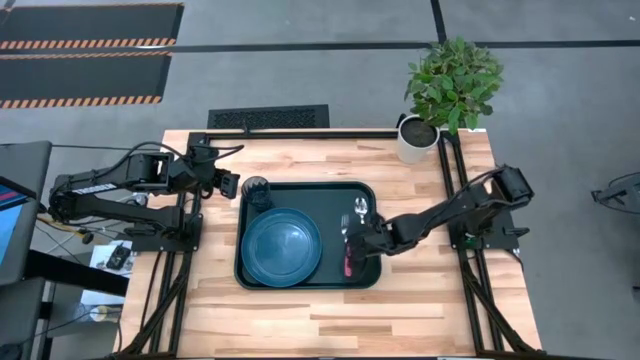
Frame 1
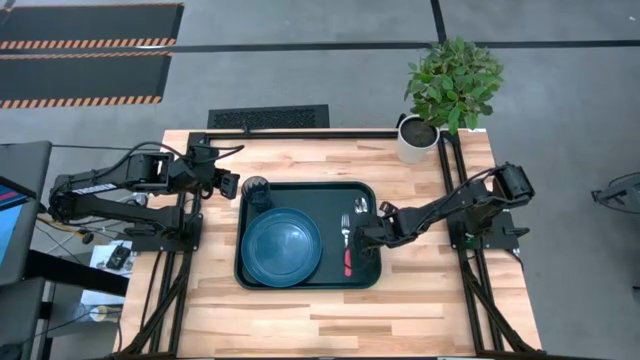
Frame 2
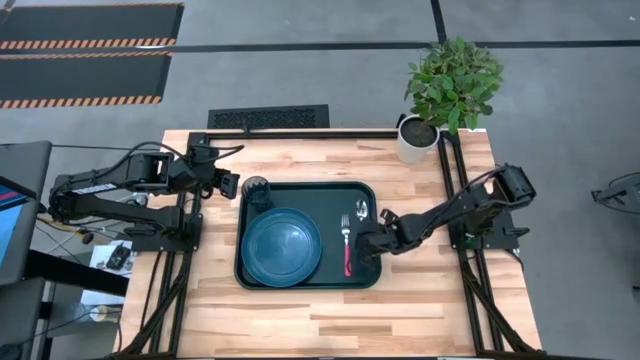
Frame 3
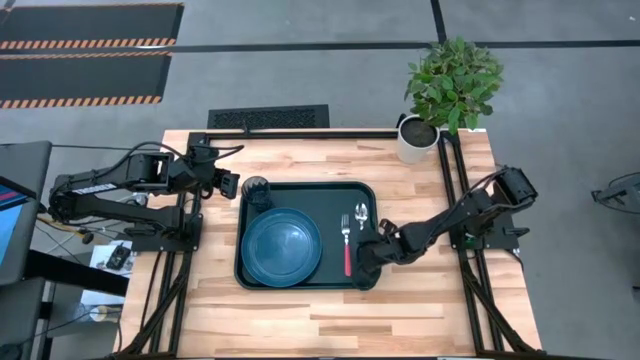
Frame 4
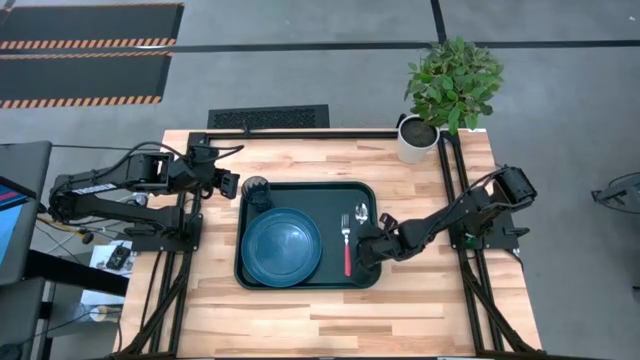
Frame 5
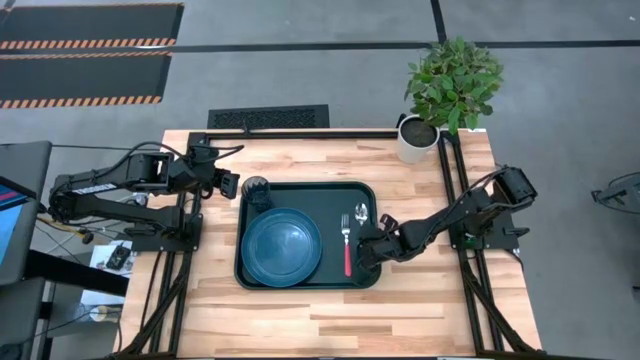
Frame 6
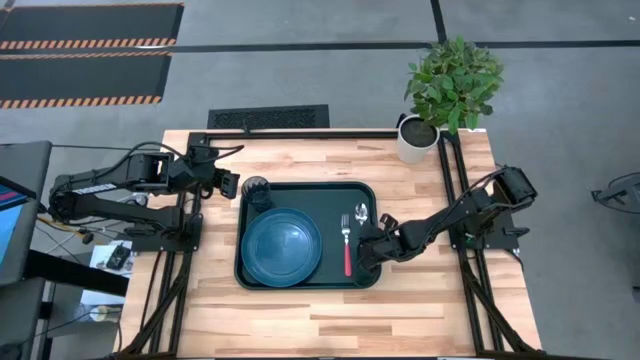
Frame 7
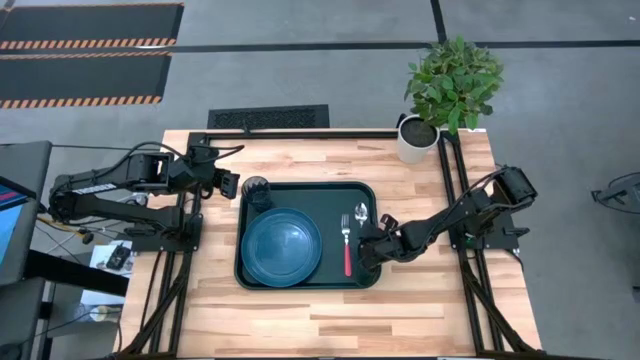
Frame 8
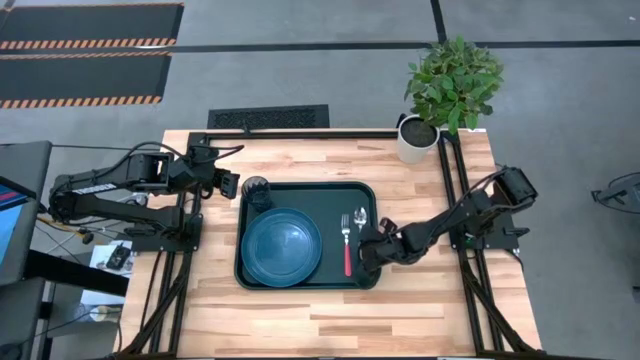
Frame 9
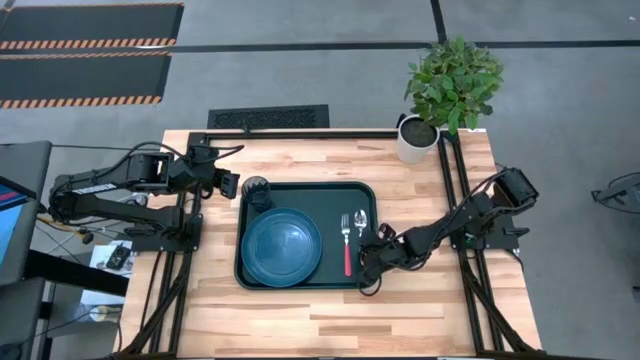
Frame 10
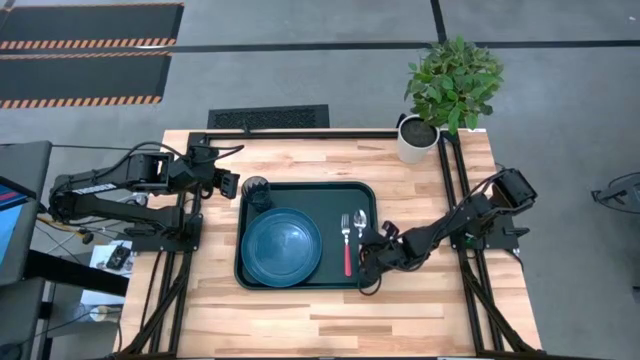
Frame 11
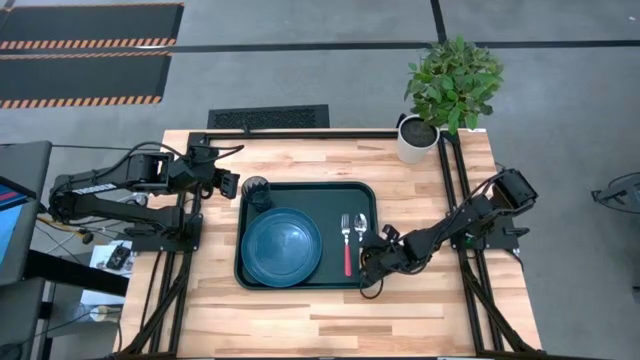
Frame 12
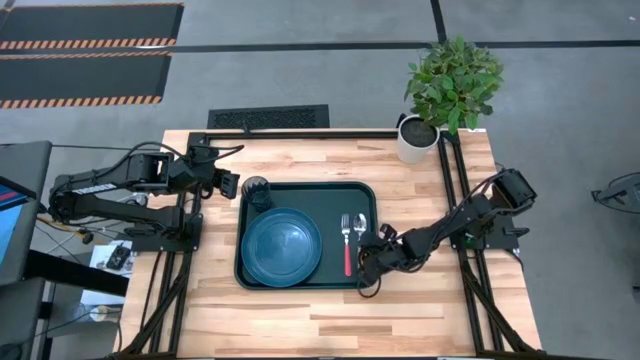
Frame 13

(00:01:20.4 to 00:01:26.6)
Task: Pick and place plate/cup/fork/spoon on tray
Adjust the yellow spoon on the black serving tray

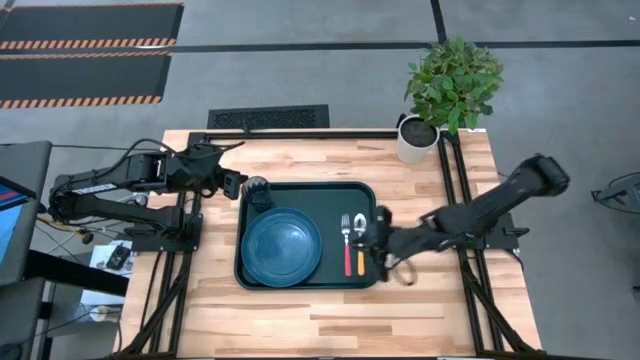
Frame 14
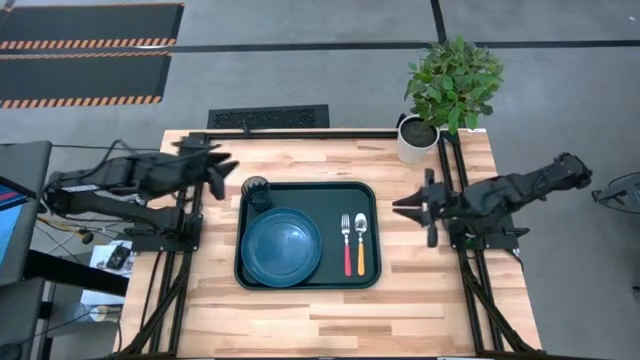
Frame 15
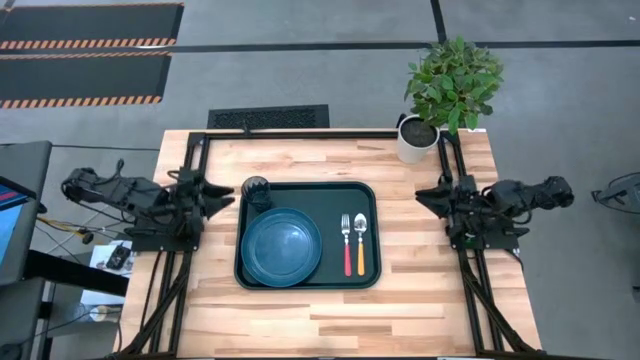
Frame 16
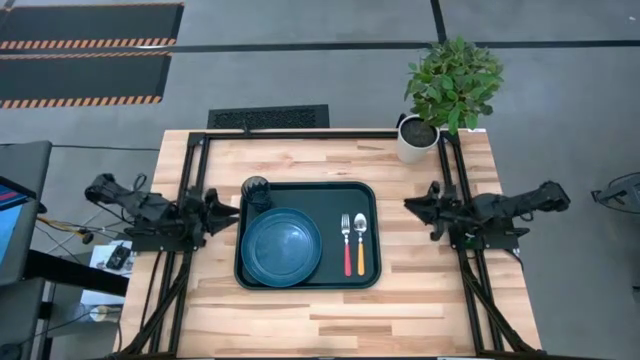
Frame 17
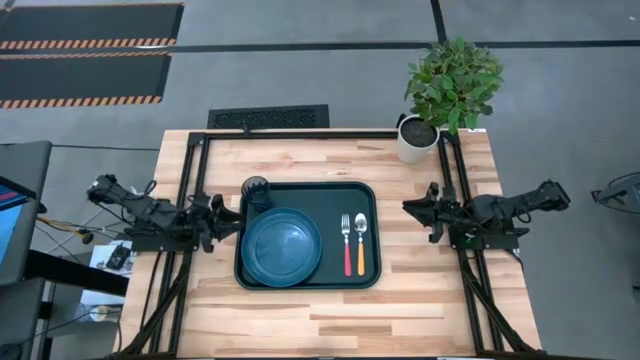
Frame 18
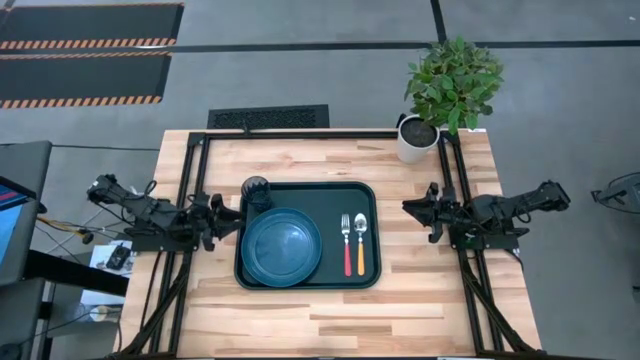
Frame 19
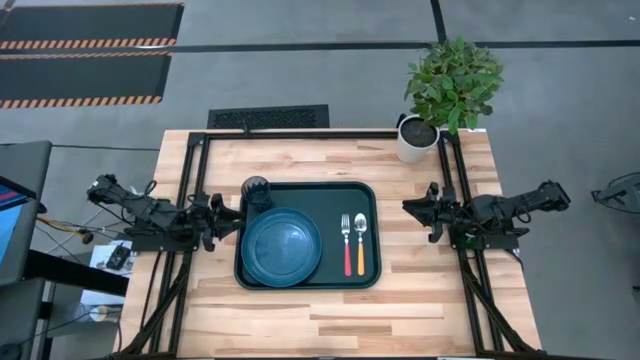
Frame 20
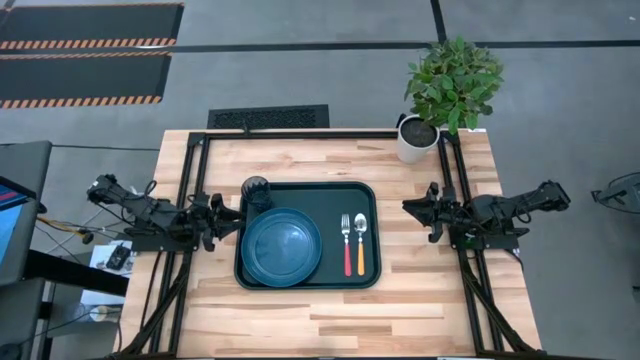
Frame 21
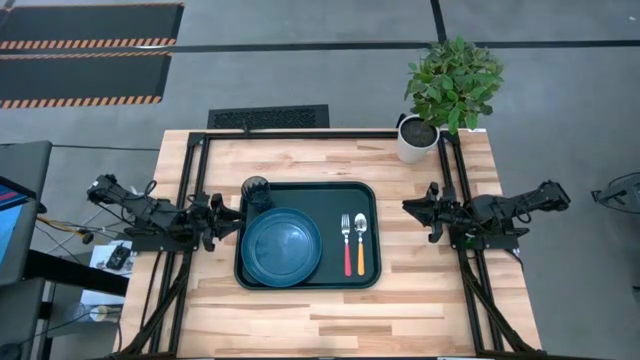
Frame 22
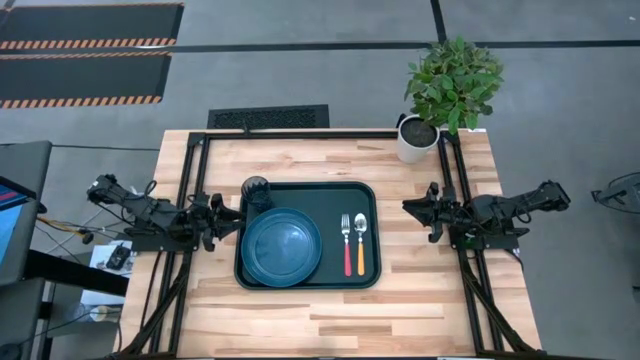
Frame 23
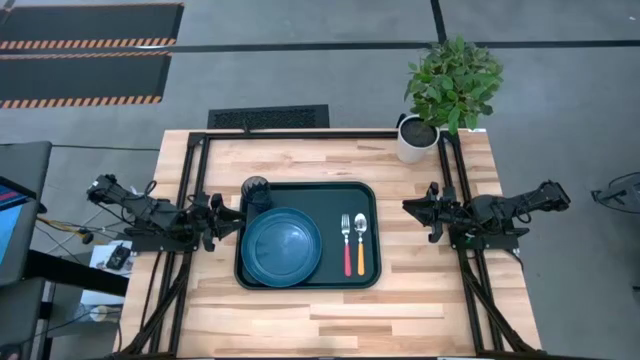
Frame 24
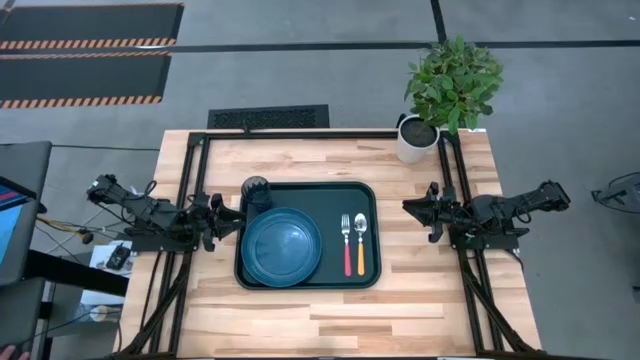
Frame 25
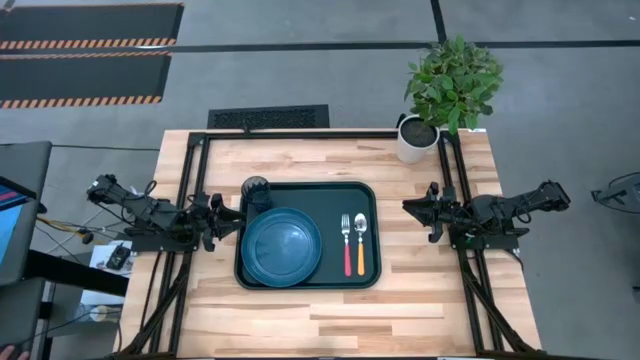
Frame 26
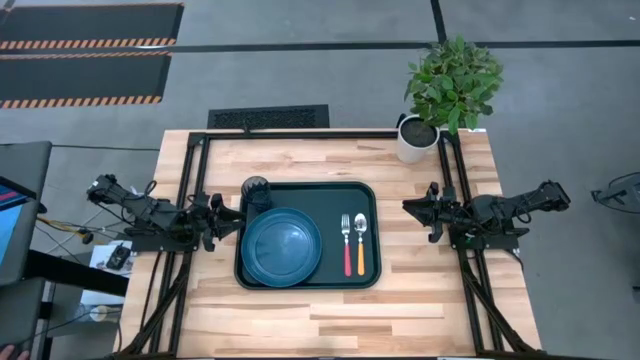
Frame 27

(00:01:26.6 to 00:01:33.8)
Return to Home Position

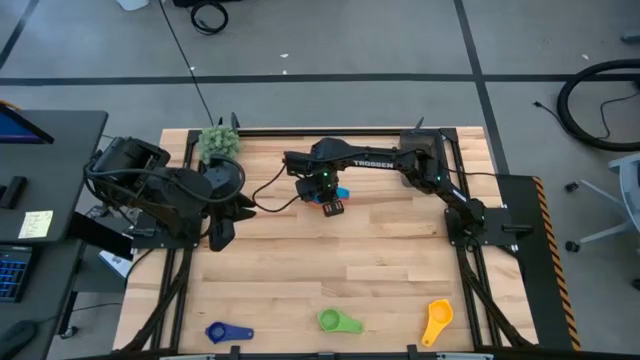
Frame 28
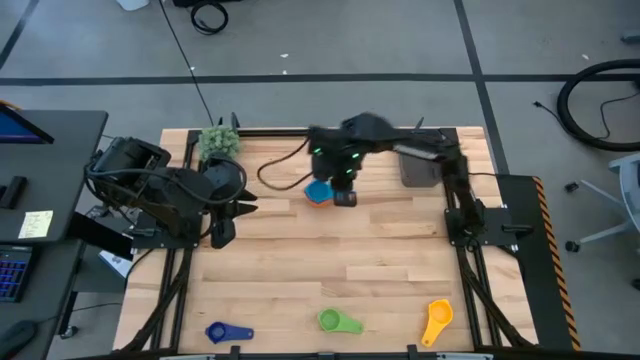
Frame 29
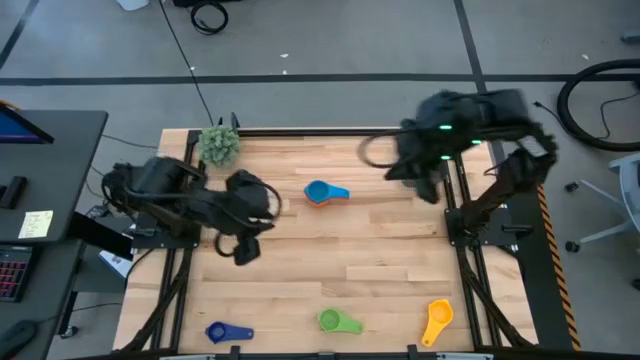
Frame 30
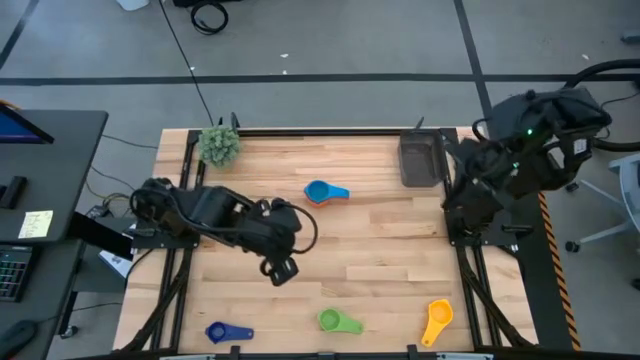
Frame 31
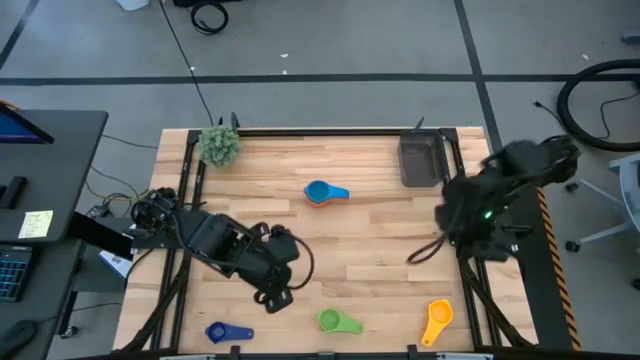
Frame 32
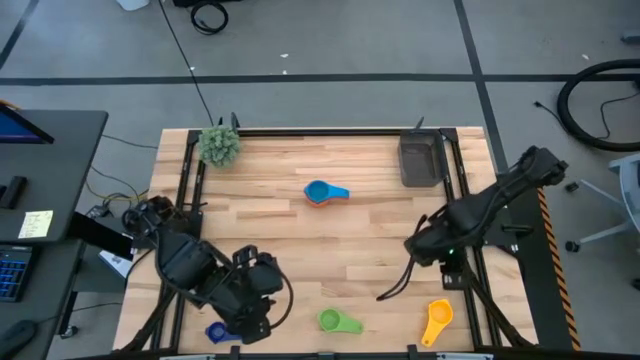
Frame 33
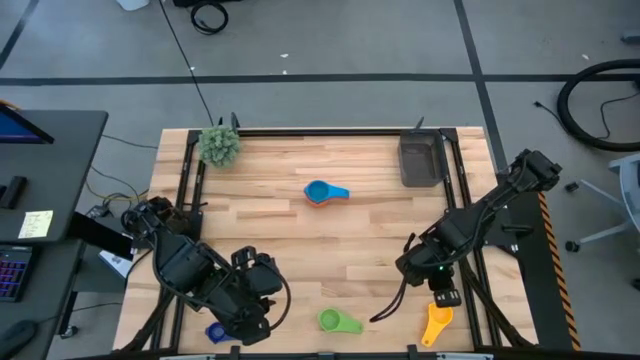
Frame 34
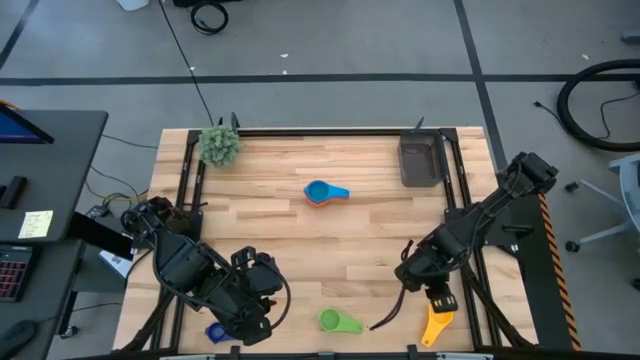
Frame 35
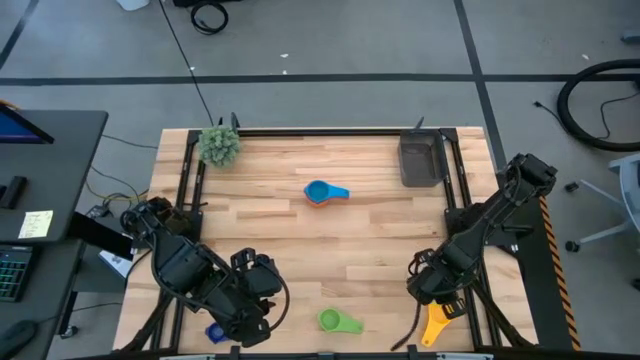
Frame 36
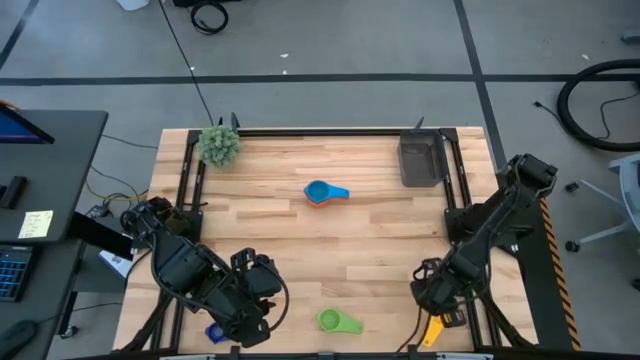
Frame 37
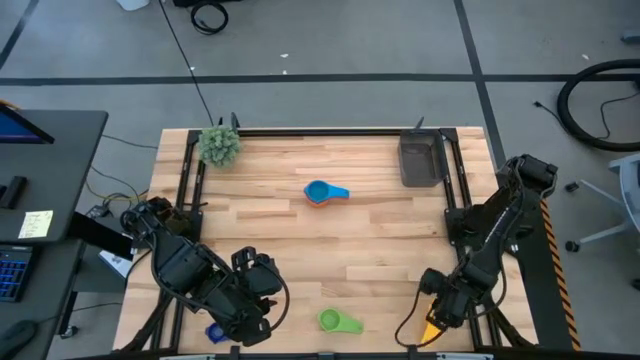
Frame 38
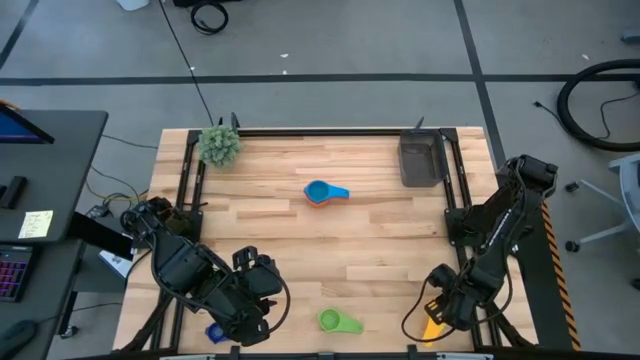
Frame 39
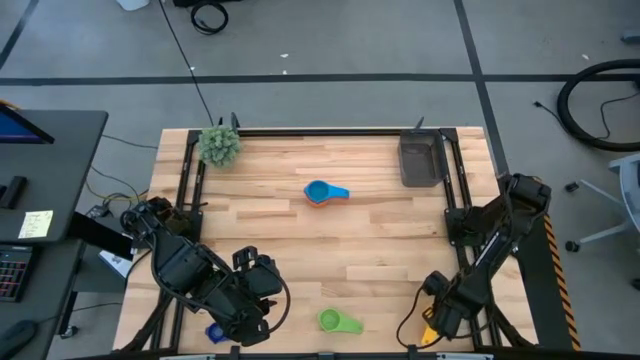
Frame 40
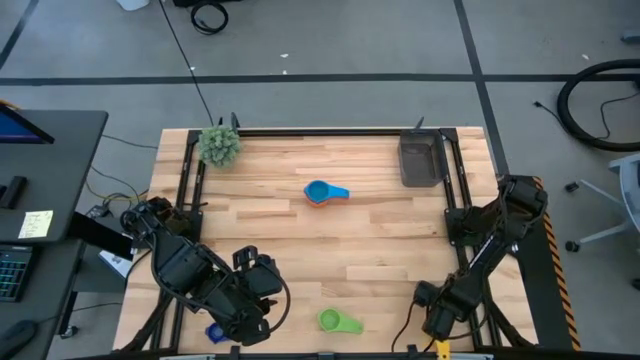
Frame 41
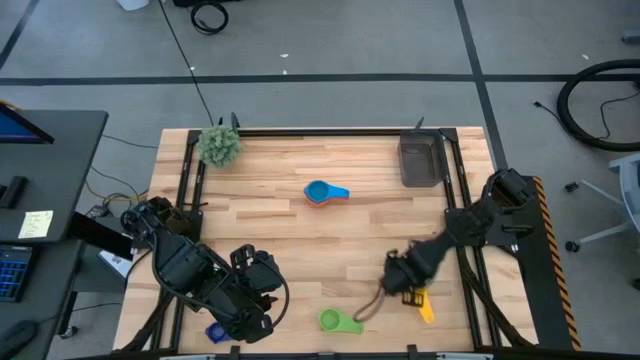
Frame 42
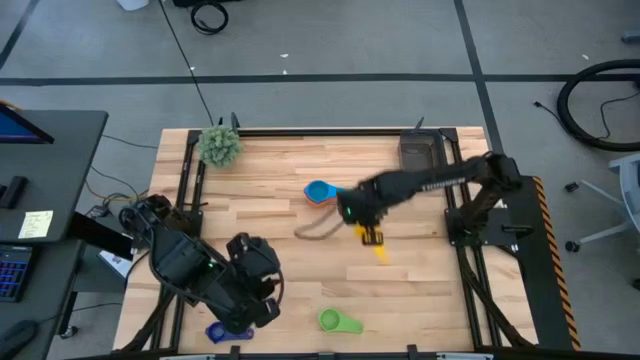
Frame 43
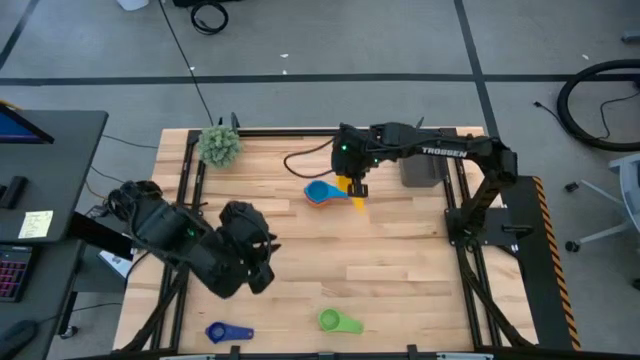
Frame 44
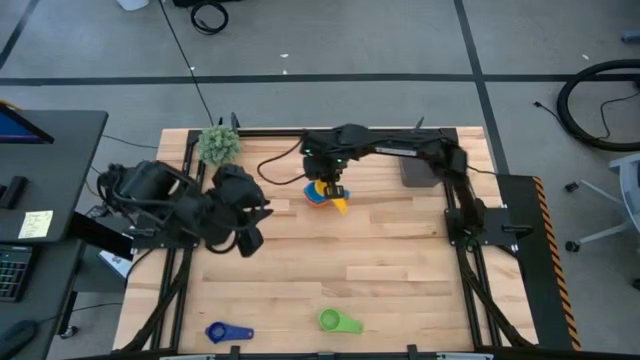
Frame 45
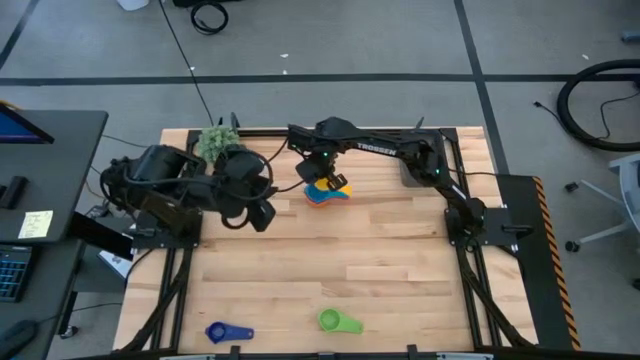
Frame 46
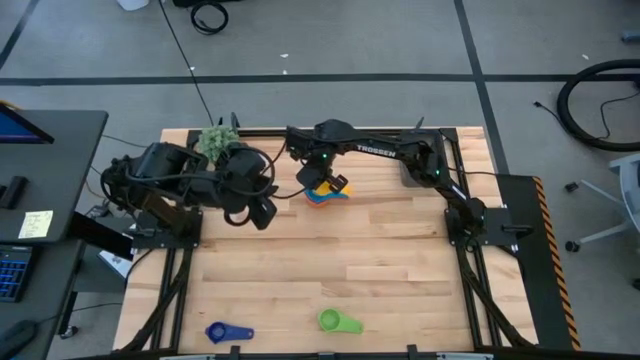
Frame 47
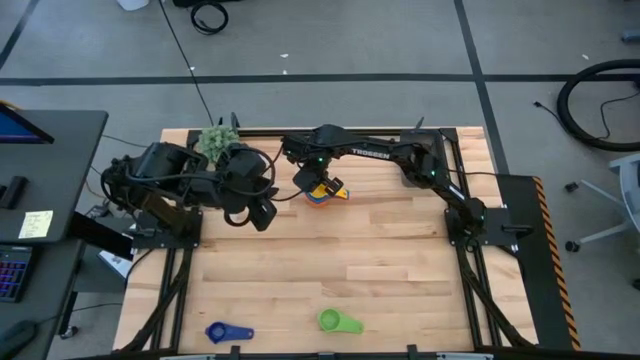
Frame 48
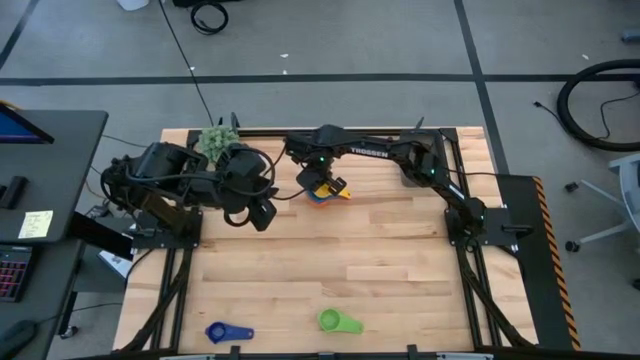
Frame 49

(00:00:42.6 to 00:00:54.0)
Task: Nest measuring cups in basket
Stack the yellow measuring cup on top of the light blue measuring cup
